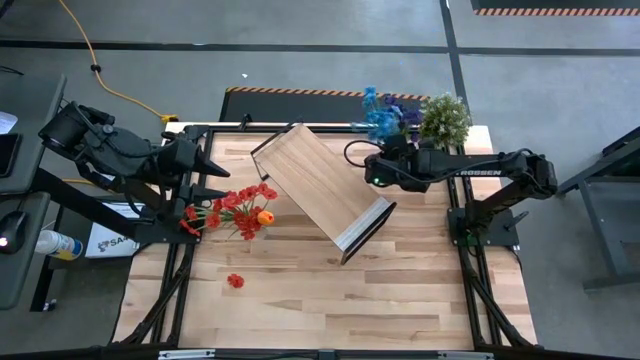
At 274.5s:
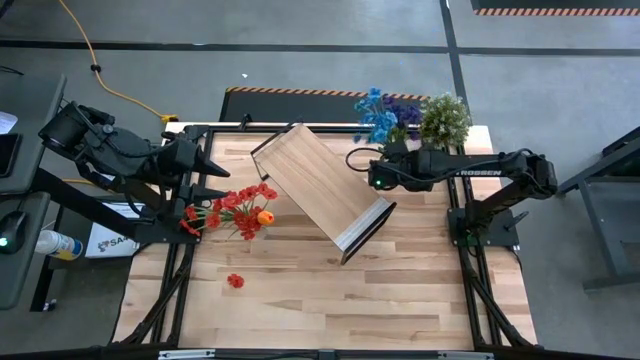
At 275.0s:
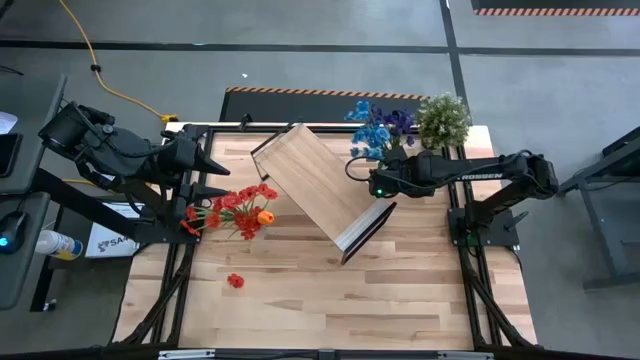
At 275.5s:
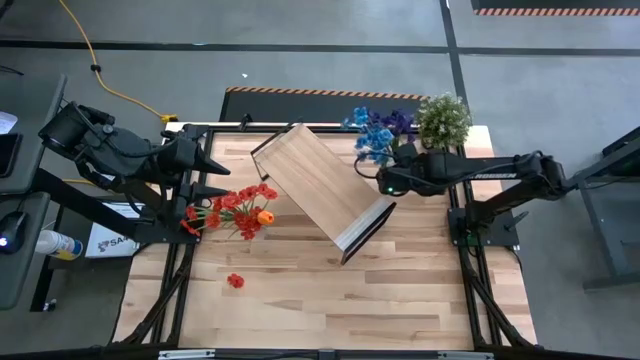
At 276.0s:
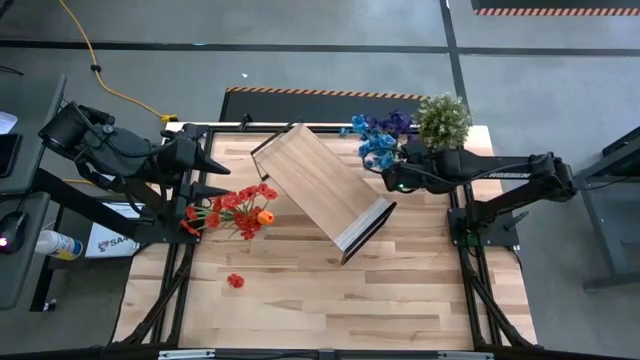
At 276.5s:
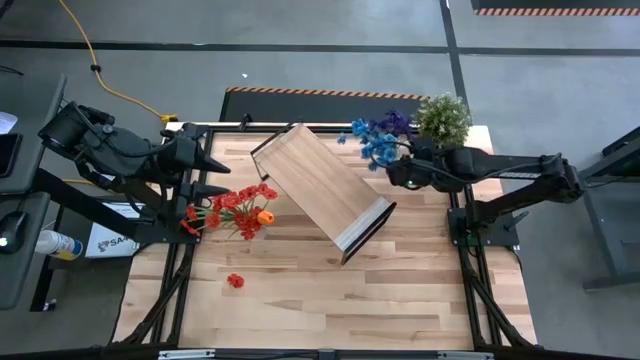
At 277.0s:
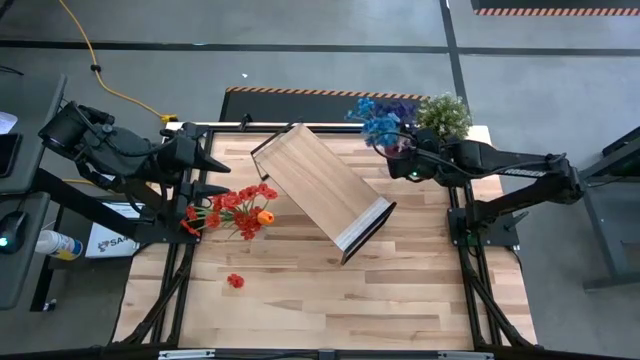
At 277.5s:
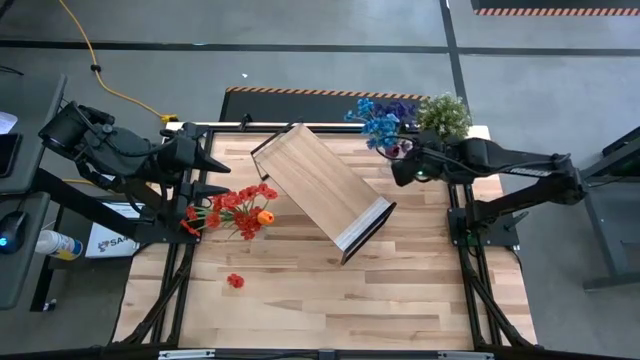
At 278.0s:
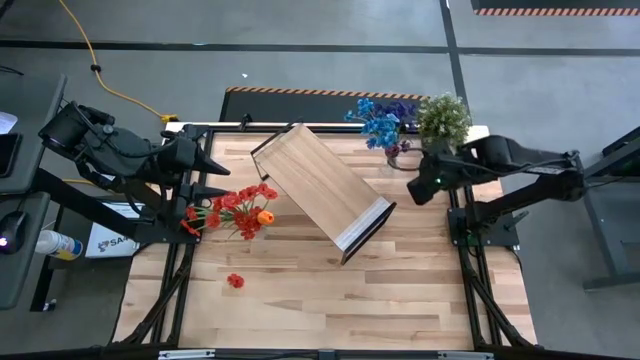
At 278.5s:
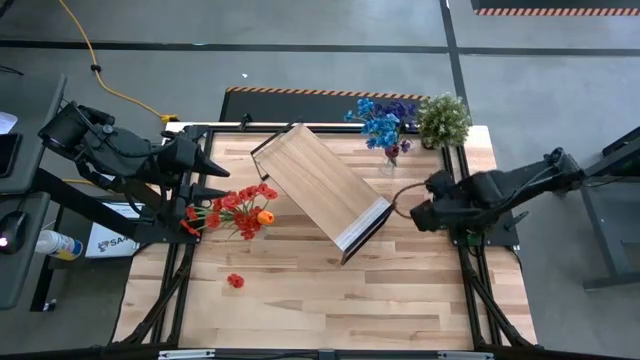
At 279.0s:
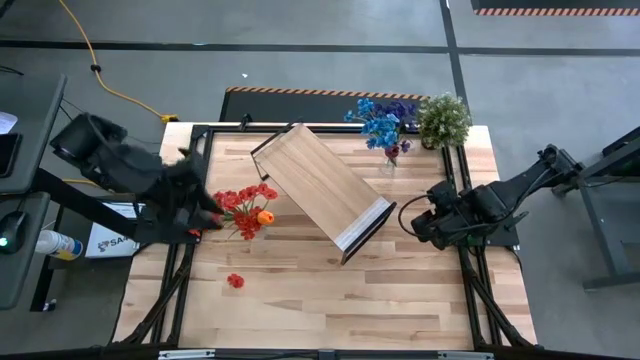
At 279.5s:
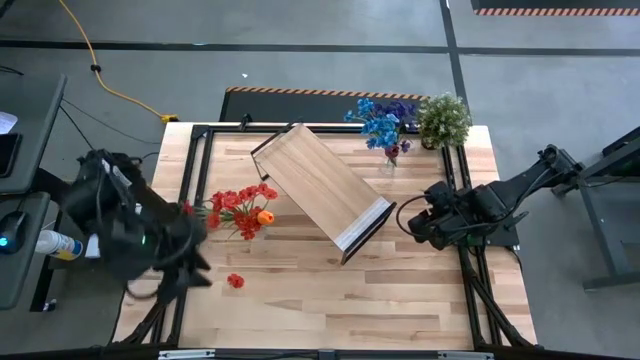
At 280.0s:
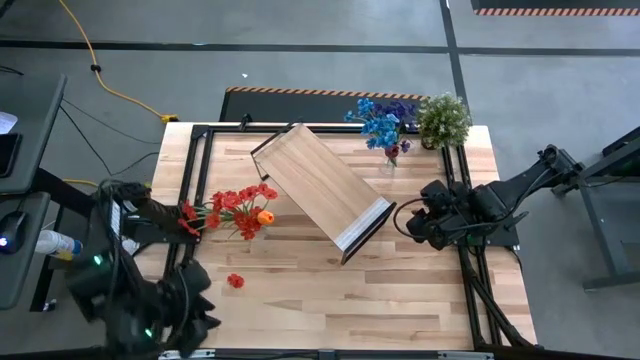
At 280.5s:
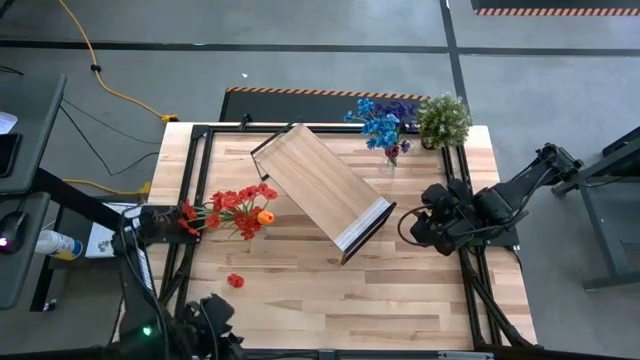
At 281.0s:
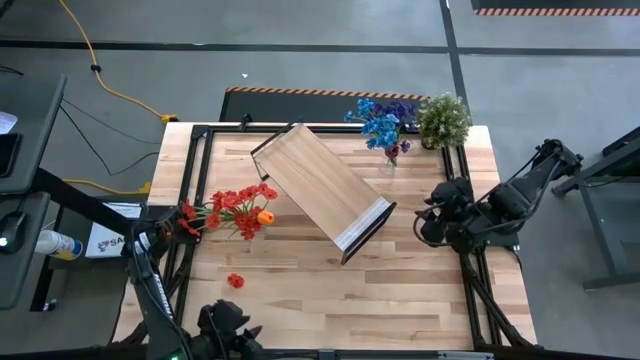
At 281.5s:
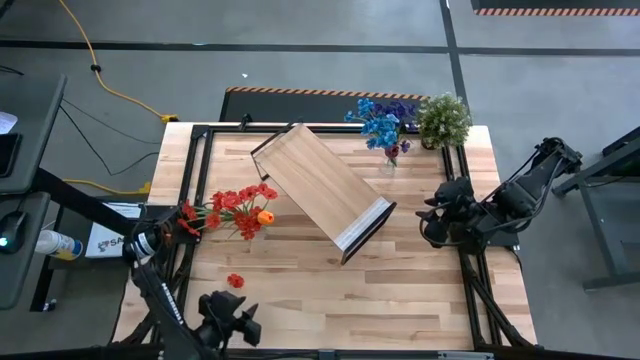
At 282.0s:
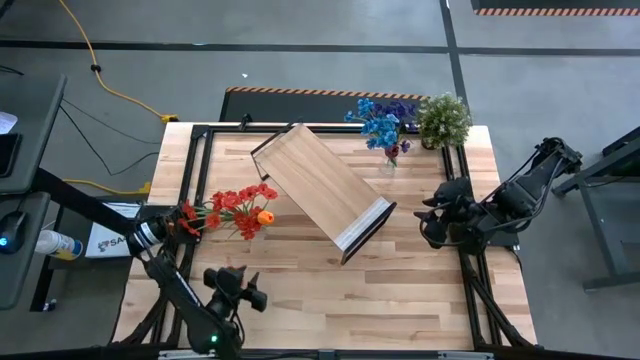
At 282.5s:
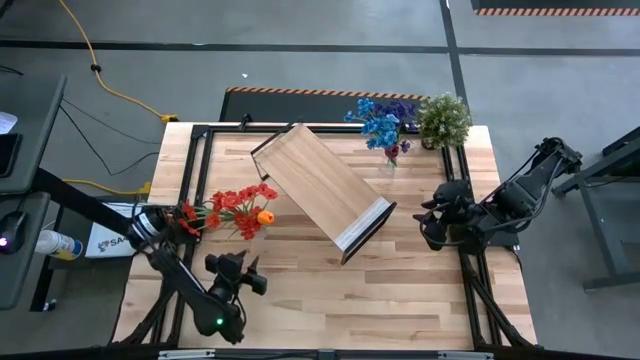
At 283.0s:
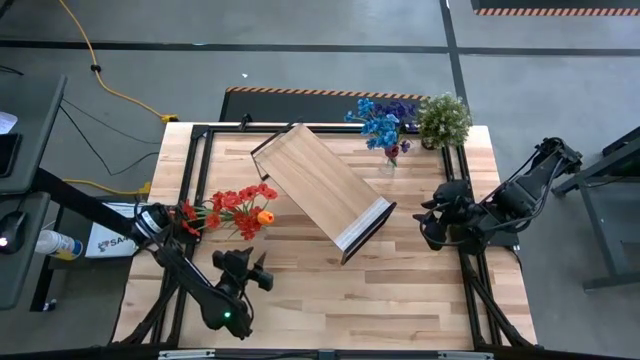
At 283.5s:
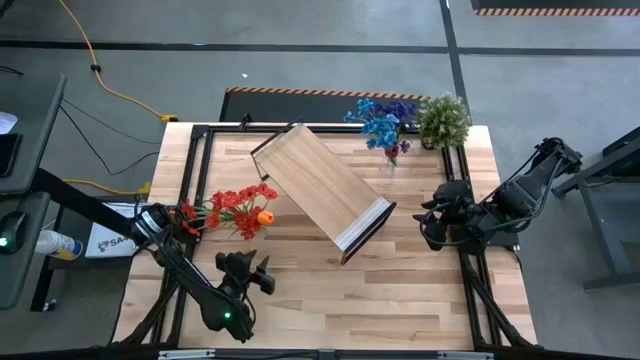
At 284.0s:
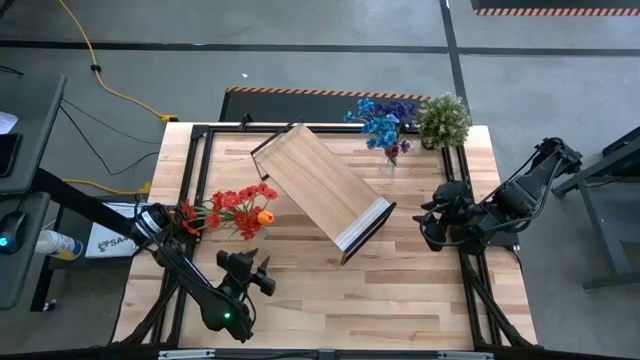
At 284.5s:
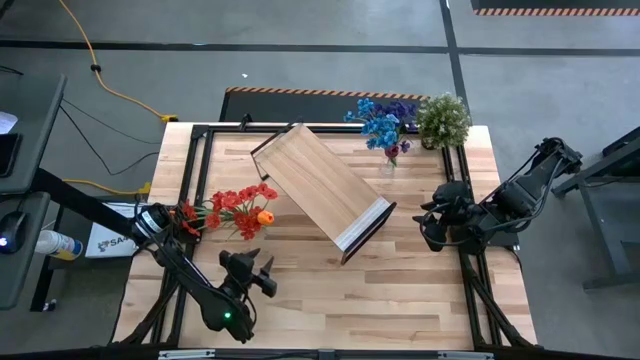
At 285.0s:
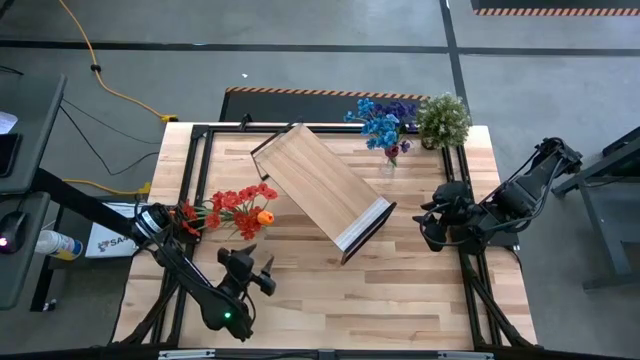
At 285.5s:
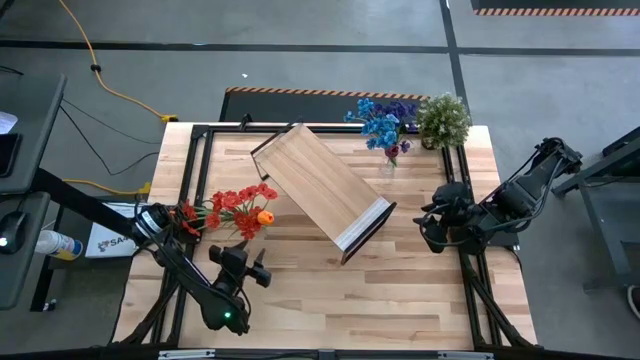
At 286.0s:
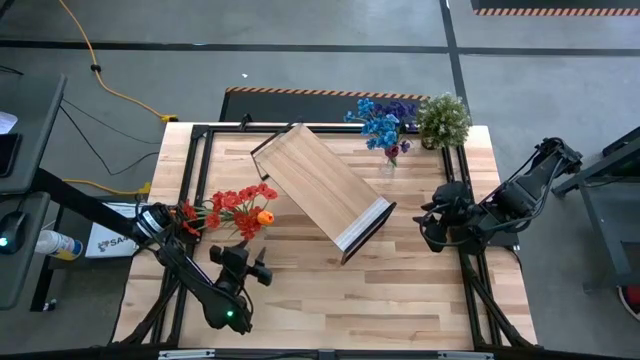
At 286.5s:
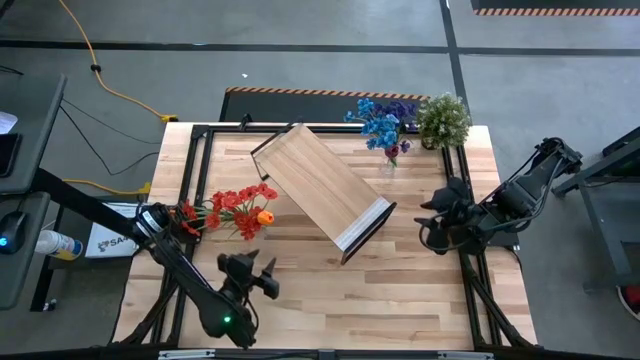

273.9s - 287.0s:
Task: Pick and place flowers into a vace then onto a shelf
Put the bottom transparent vase on the shelf

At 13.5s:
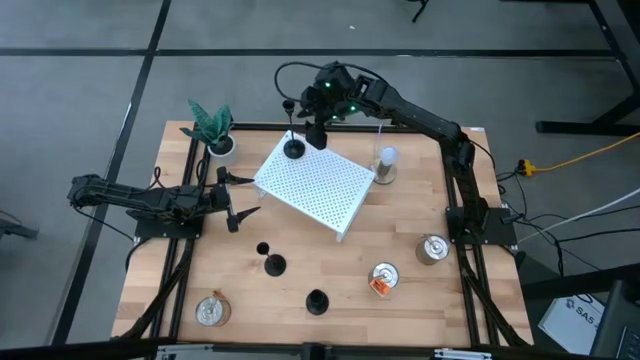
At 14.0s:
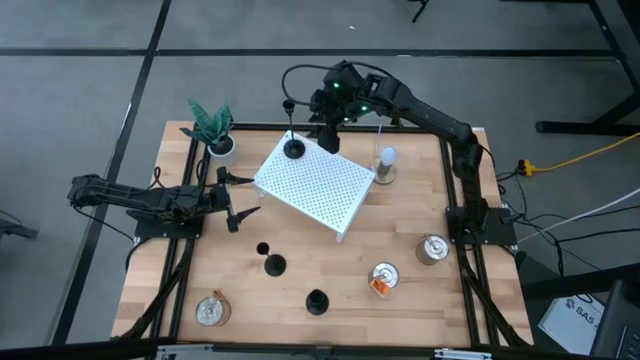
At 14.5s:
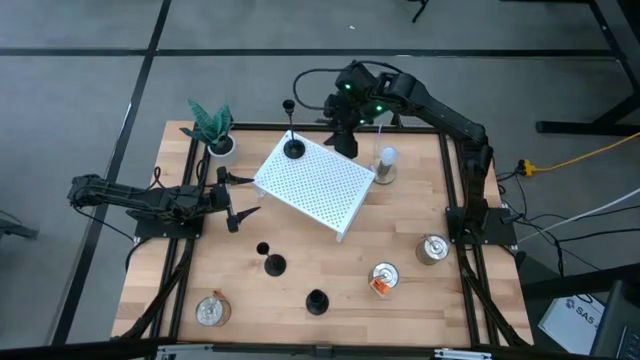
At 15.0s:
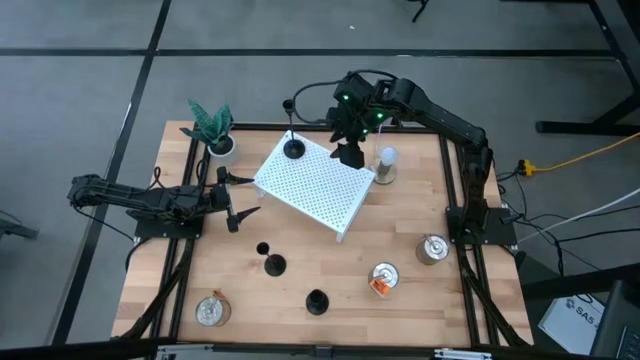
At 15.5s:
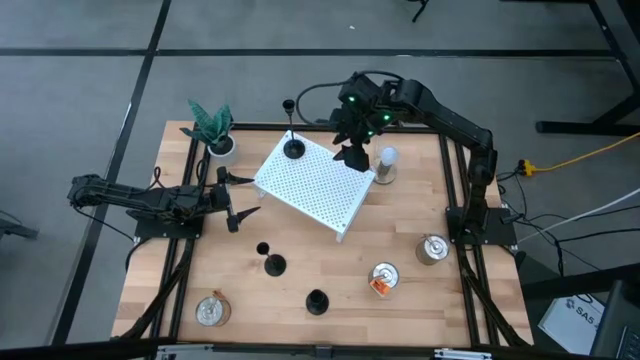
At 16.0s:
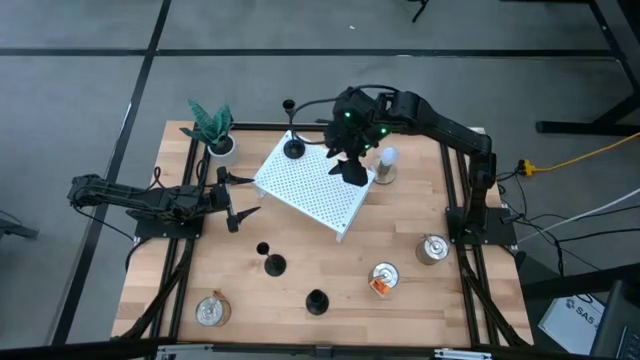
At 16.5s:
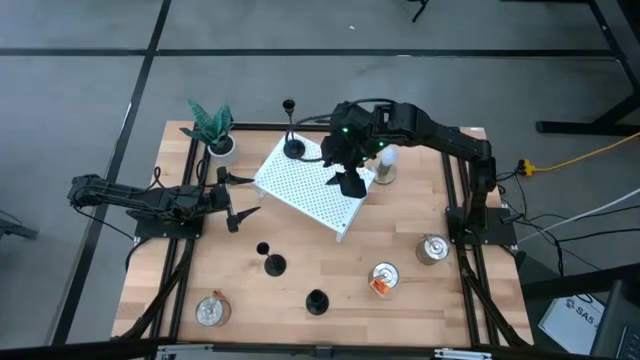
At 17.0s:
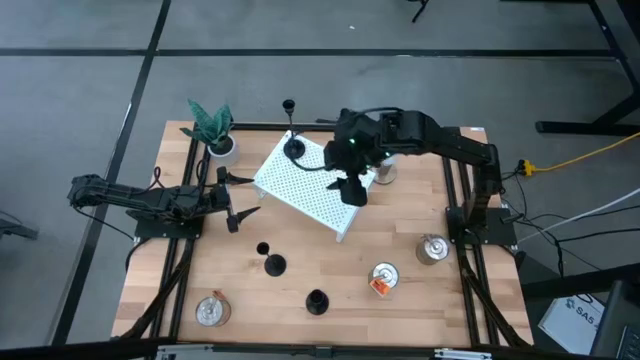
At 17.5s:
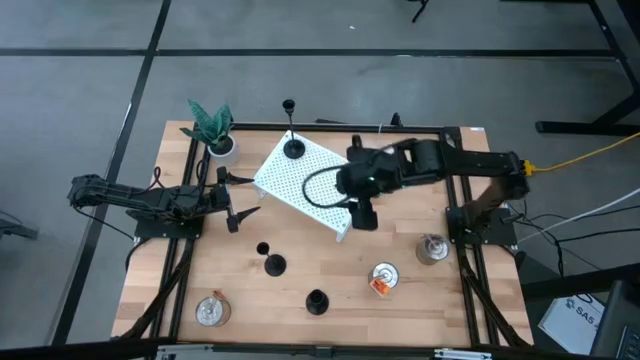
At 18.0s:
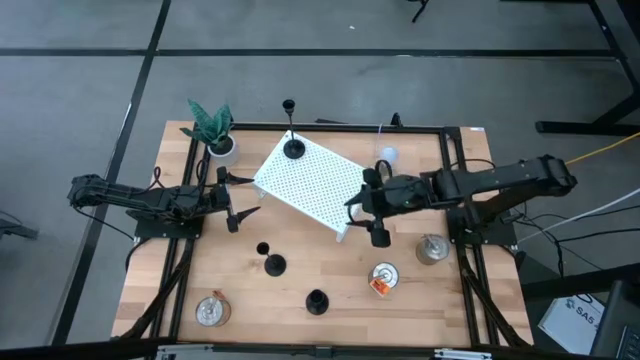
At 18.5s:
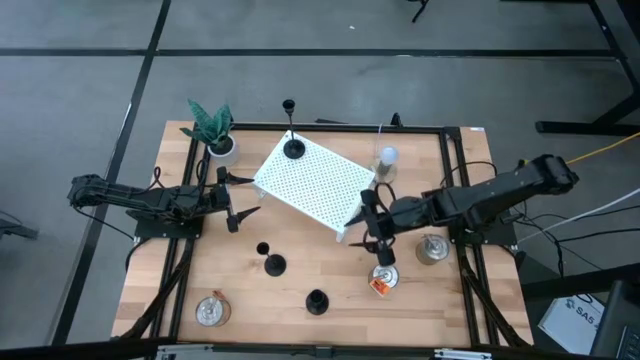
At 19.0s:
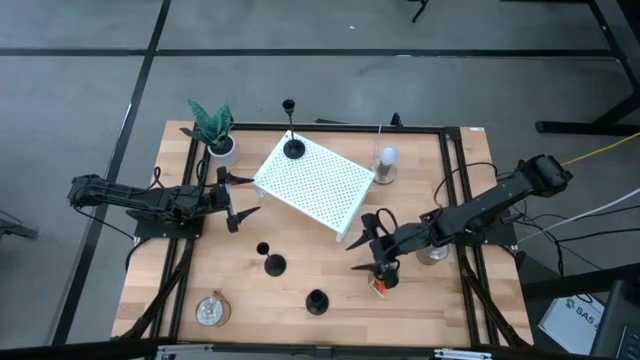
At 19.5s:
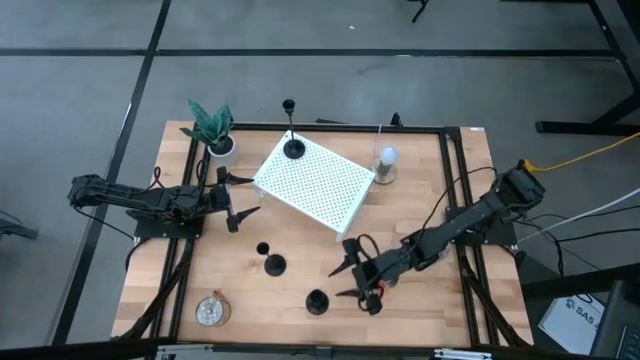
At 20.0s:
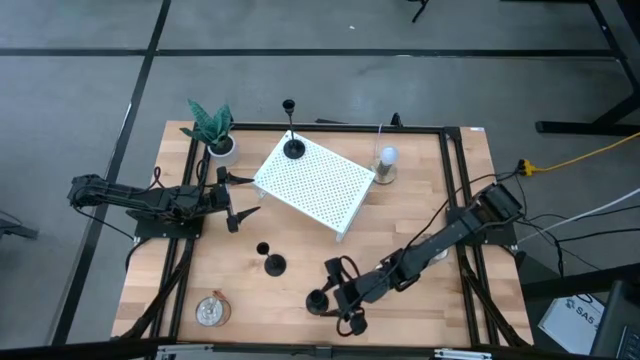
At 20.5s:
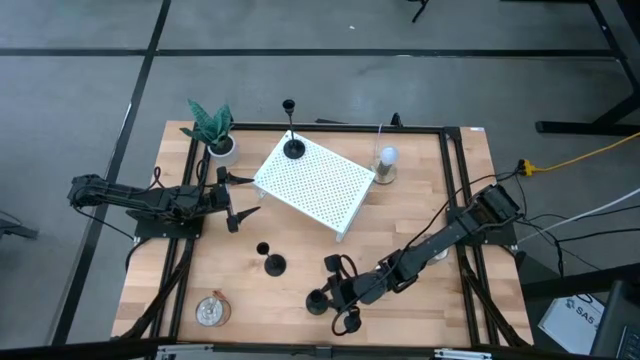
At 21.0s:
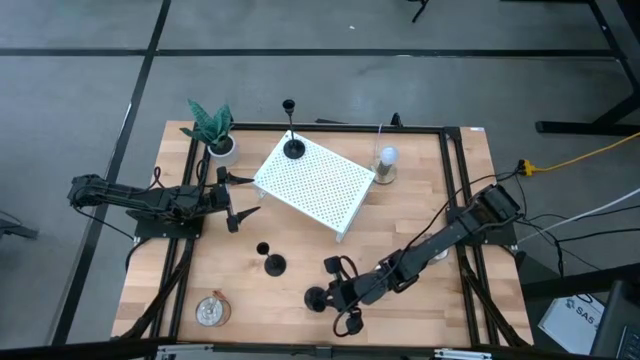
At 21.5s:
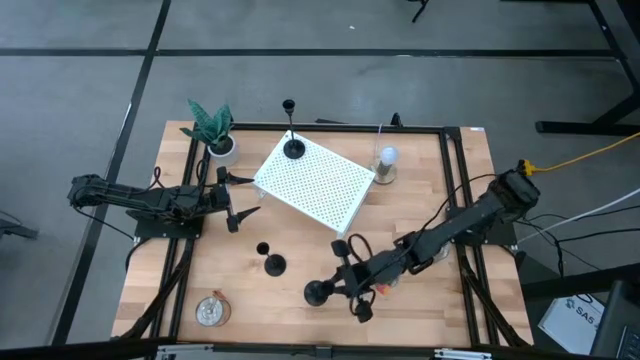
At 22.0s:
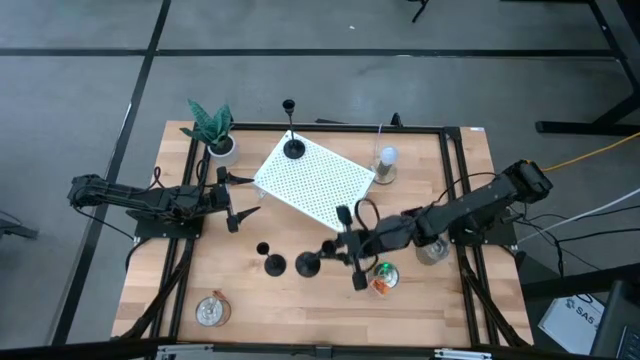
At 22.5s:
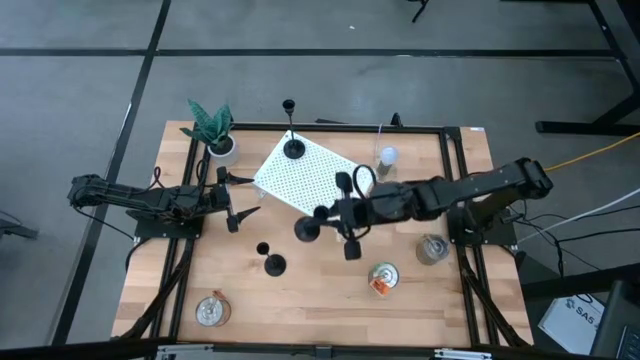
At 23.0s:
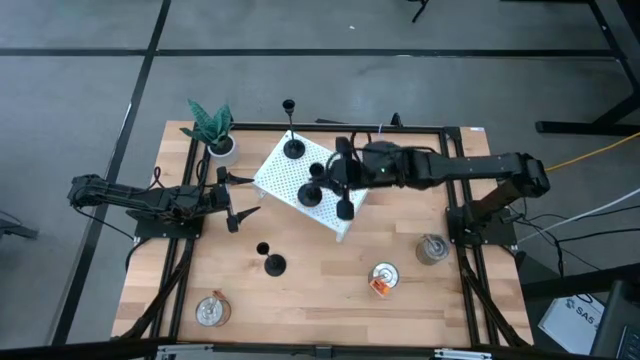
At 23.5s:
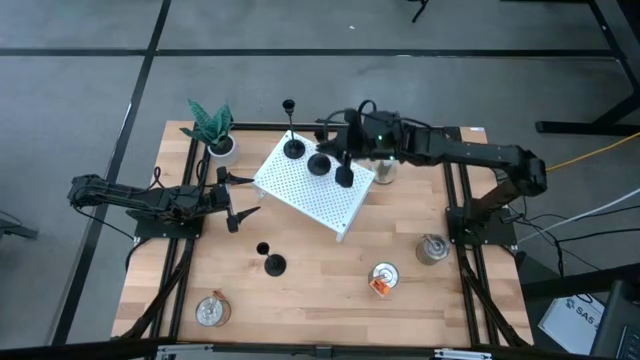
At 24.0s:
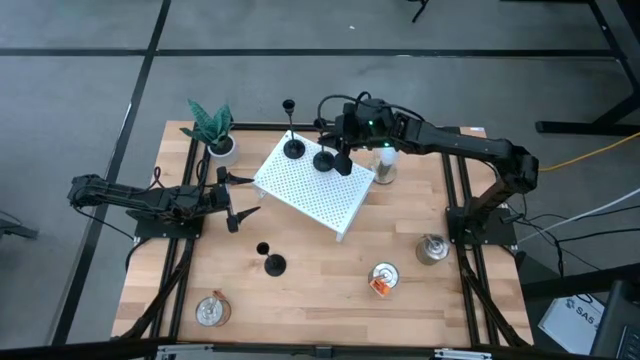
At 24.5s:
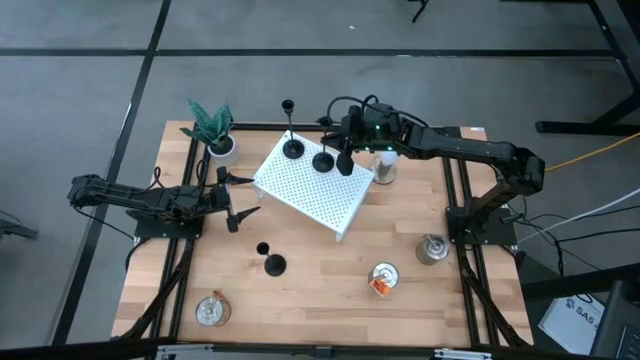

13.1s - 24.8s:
Task: Pick & Place candle stick holders
Put the bottom black candle holder on the shelf
